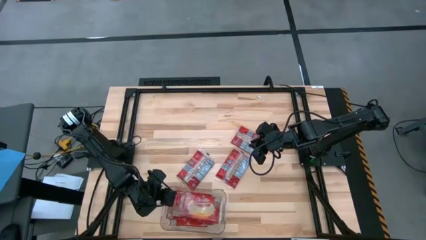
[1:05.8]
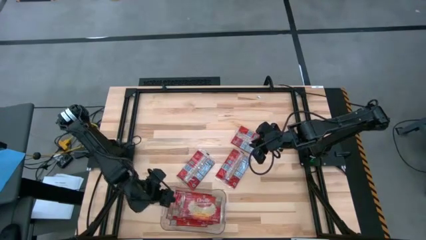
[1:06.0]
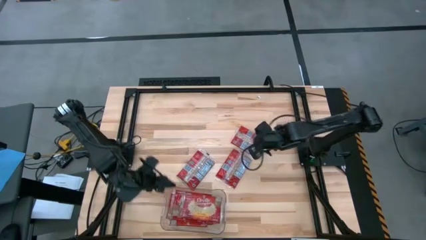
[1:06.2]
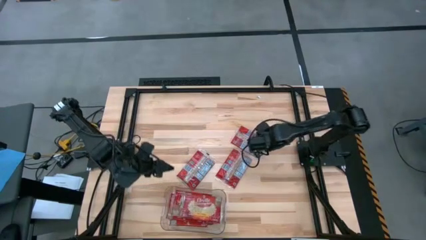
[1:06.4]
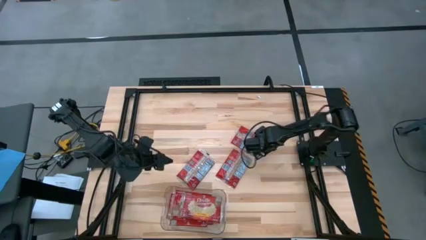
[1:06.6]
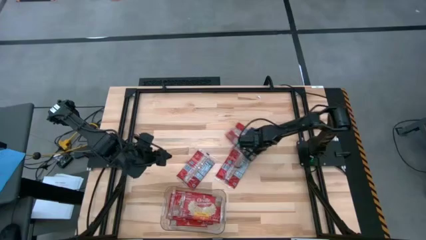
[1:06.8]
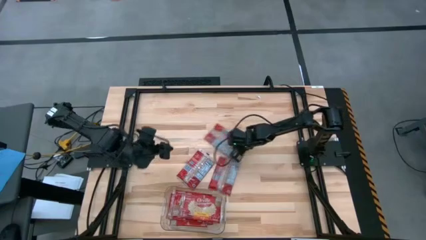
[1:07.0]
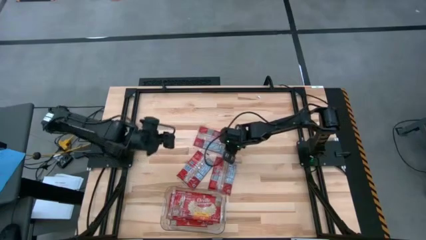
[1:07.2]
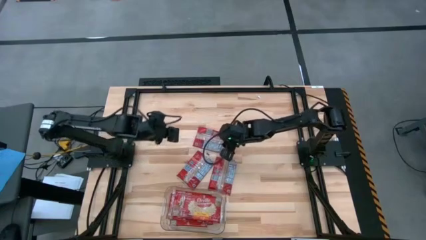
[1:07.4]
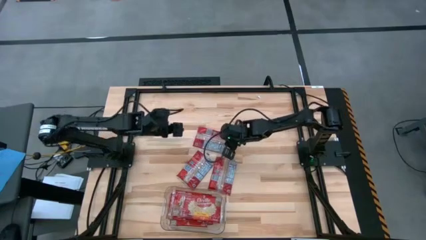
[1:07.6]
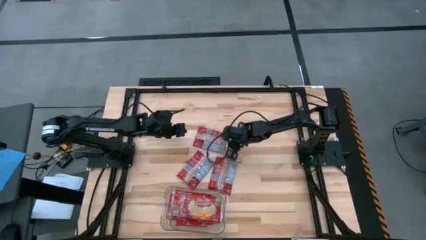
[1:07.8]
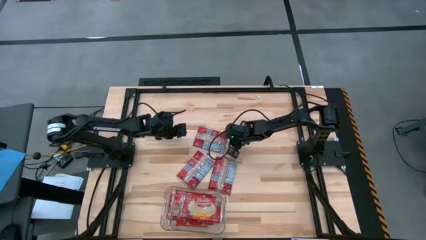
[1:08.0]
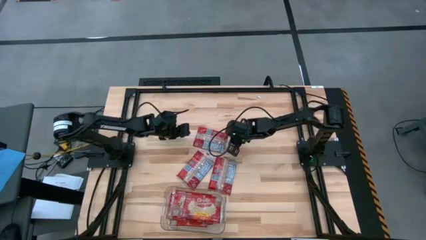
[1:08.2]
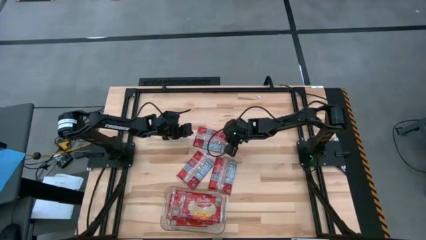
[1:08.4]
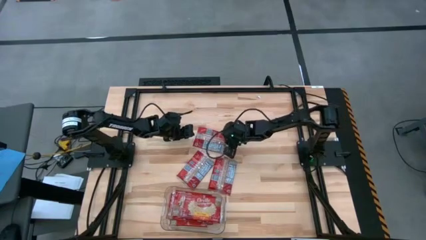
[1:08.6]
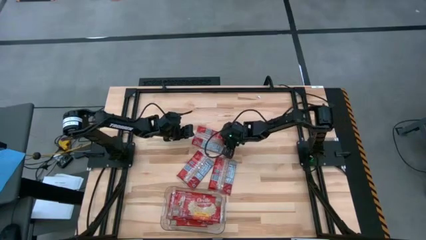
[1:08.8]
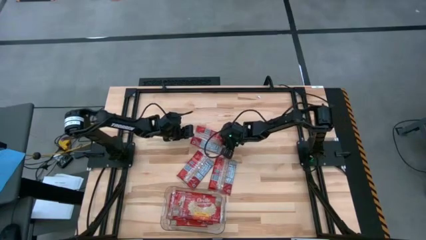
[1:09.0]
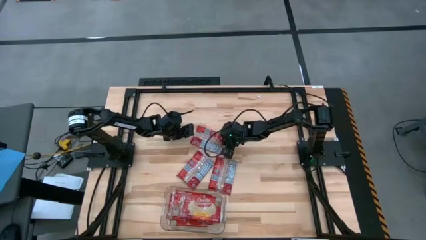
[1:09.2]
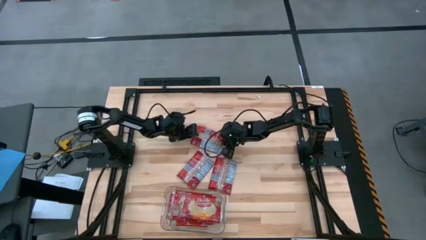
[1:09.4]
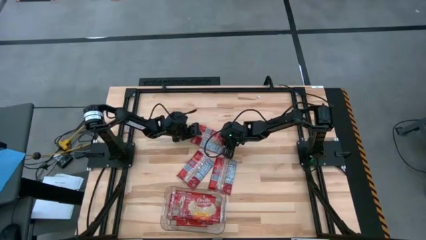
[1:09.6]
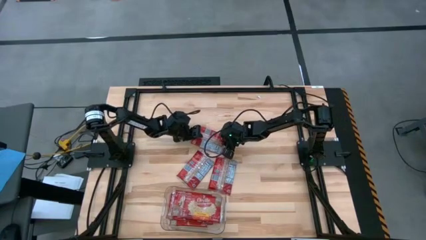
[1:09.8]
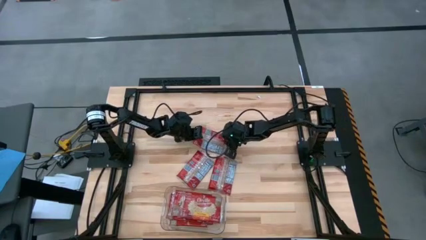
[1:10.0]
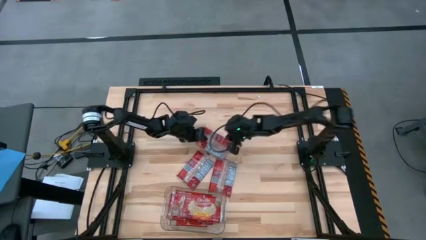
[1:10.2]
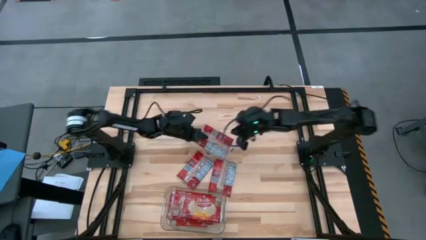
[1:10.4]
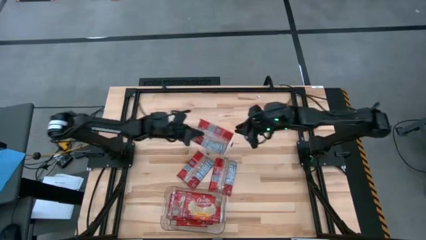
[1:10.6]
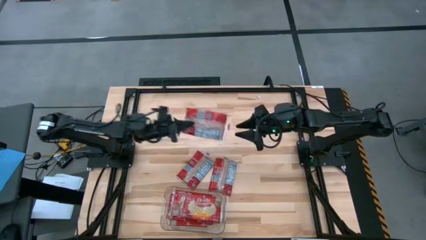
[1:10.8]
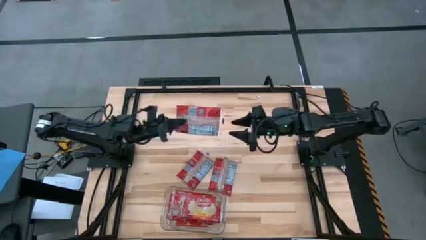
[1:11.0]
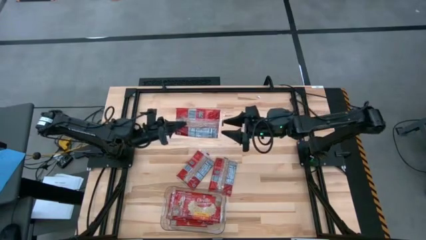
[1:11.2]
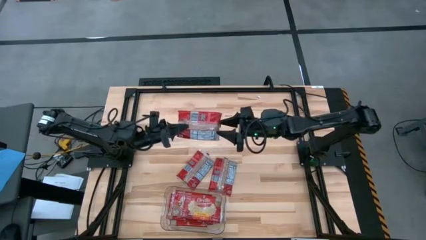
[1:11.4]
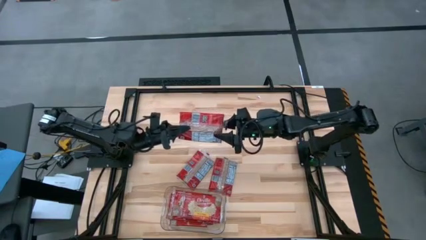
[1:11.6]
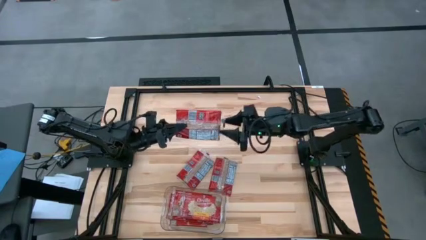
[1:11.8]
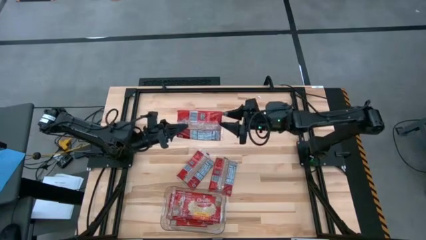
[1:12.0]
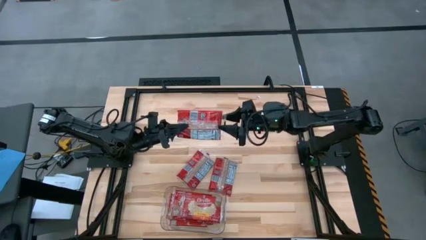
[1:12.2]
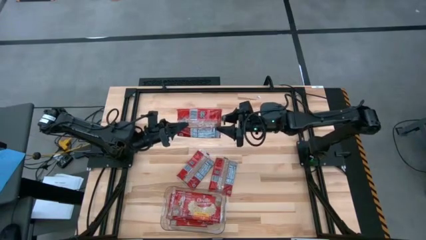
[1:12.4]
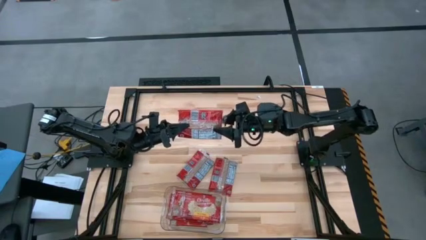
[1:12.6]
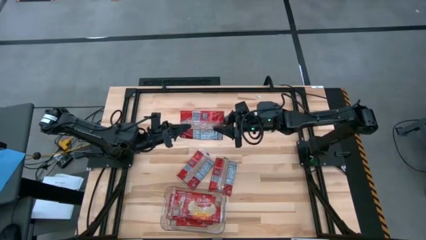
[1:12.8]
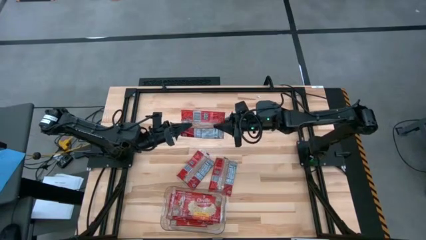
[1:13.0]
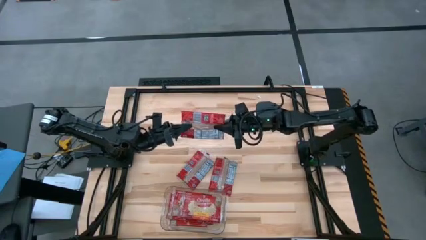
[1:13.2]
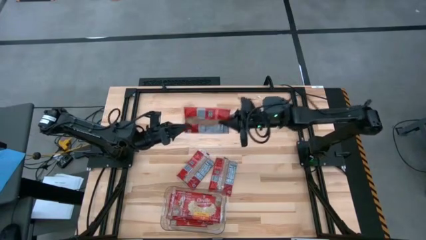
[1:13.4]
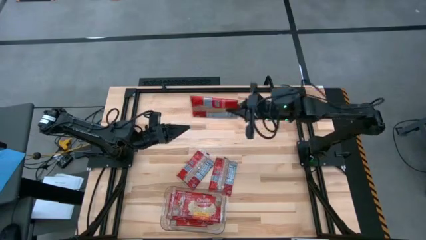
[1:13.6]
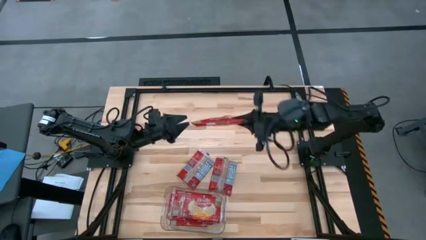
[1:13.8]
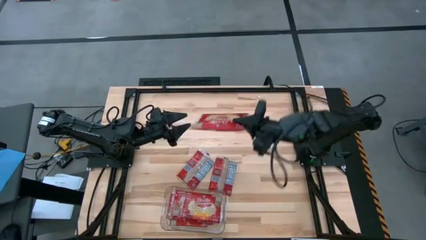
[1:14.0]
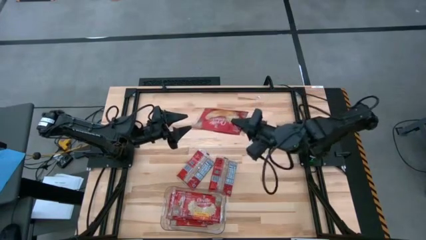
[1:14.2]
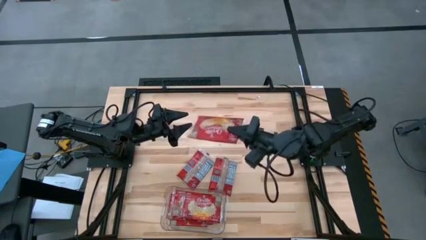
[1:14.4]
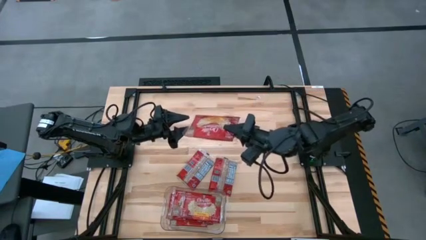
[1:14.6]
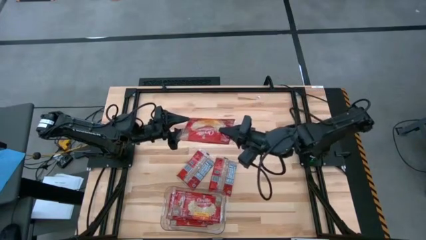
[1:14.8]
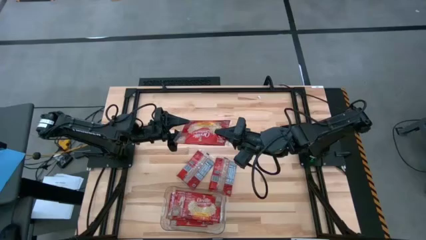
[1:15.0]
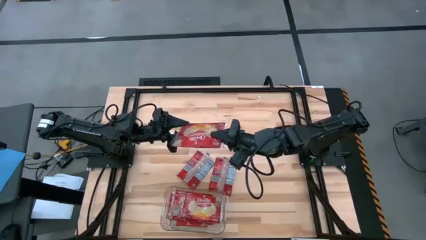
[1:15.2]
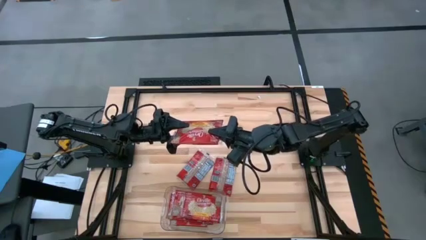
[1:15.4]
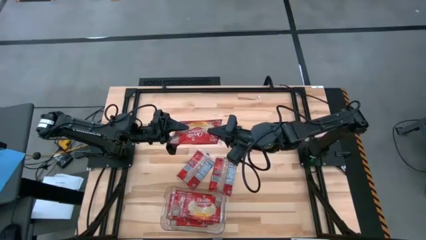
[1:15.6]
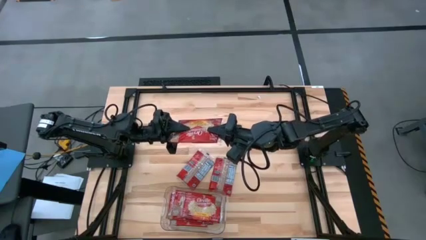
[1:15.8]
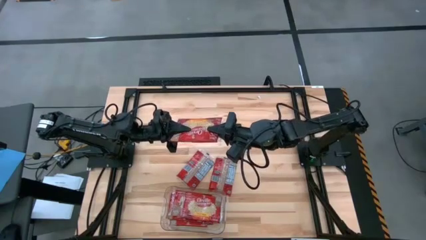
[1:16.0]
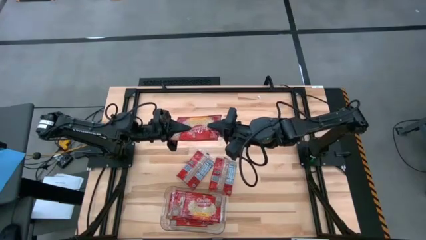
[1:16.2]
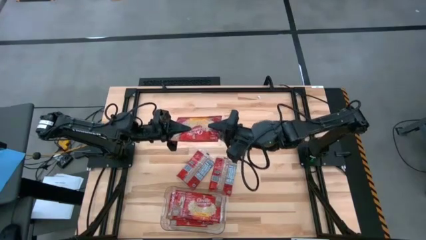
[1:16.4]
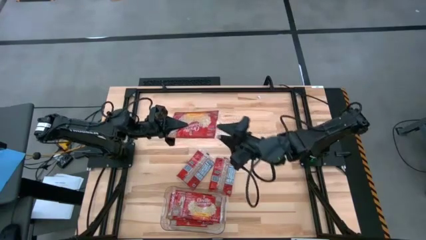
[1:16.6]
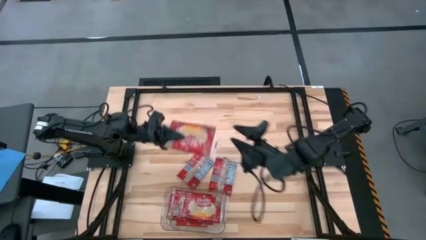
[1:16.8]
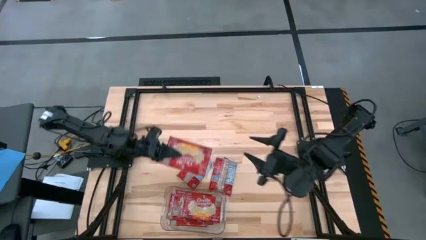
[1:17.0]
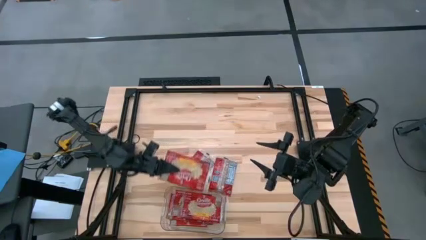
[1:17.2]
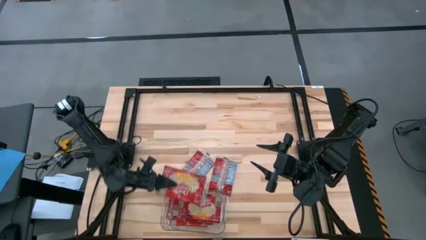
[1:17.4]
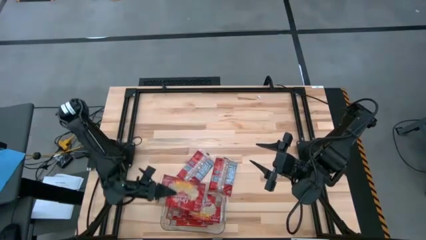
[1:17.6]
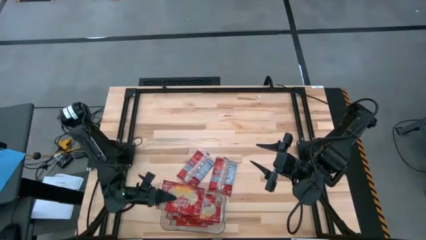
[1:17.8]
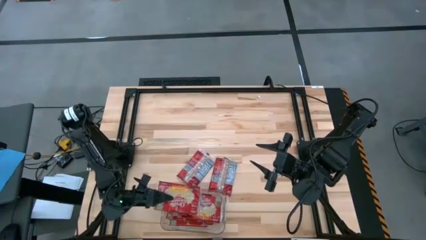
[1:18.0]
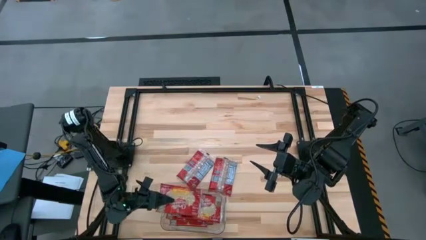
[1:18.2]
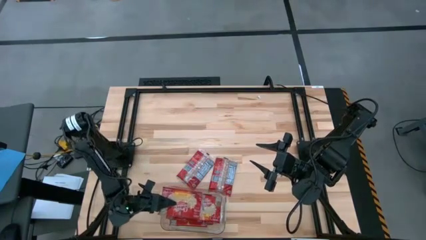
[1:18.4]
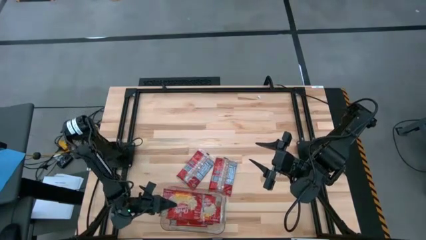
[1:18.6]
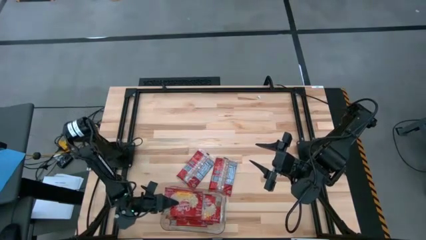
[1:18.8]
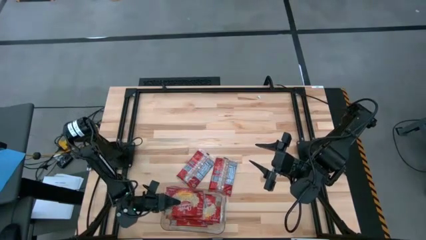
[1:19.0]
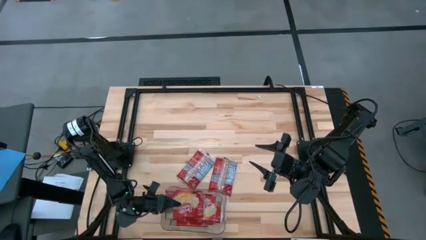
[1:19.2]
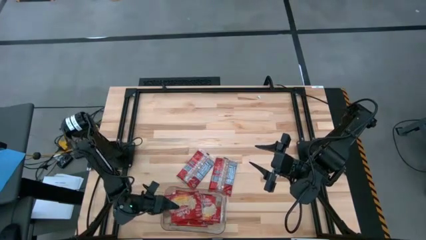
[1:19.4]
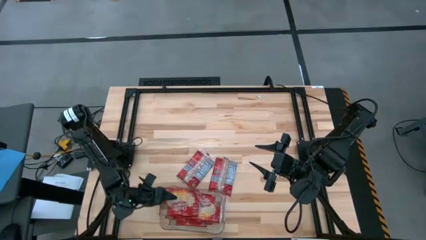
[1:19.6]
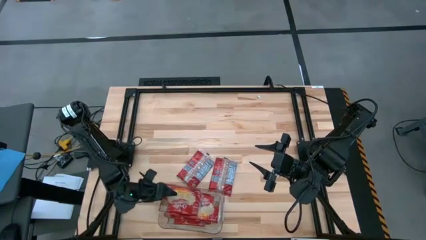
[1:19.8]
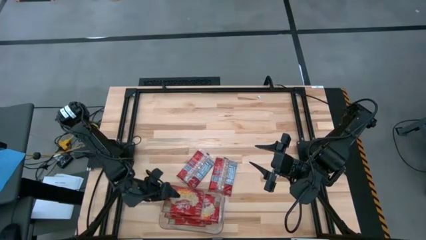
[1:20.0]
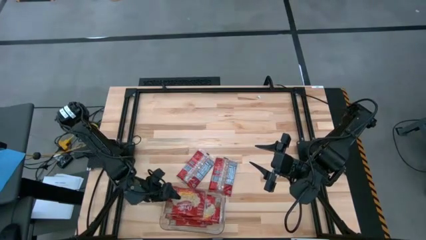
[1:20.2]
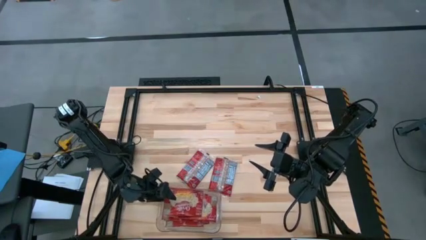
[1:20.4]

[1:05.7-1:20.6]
Task: Sort popcorn bags into baskets
Put the red popcorn bag into the transparent bin
